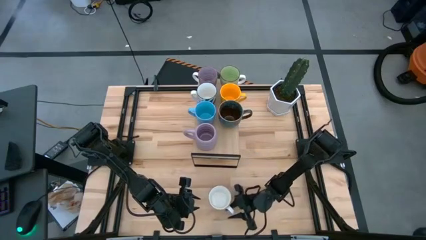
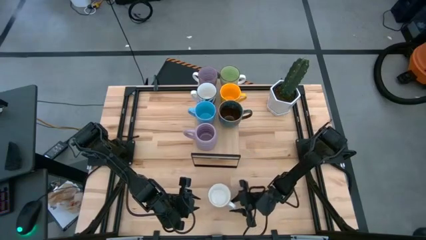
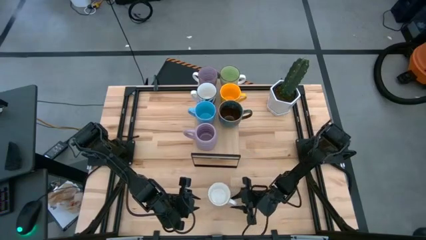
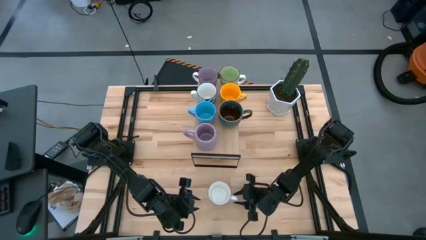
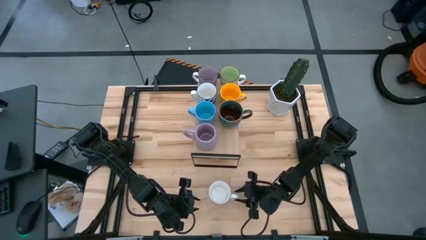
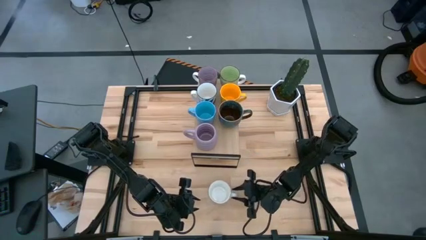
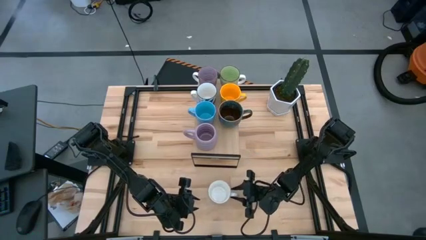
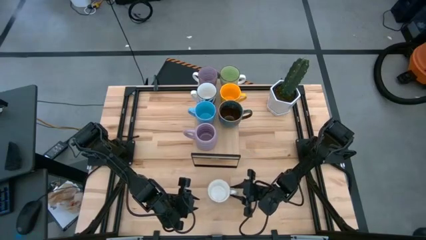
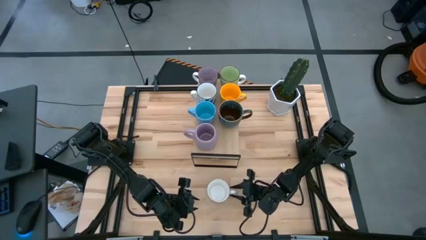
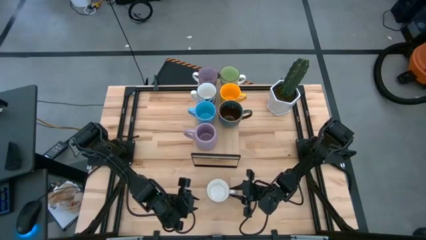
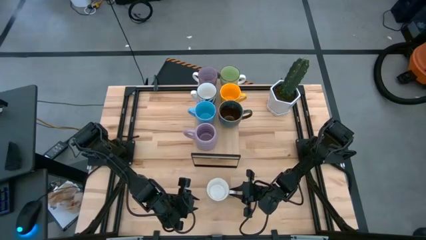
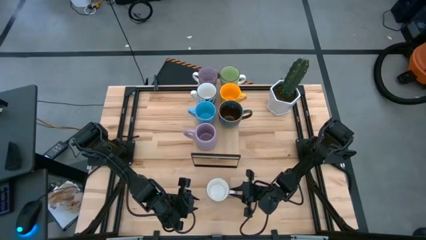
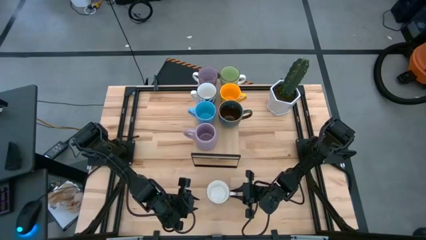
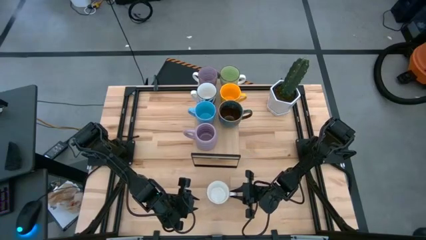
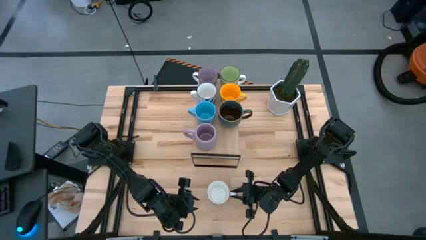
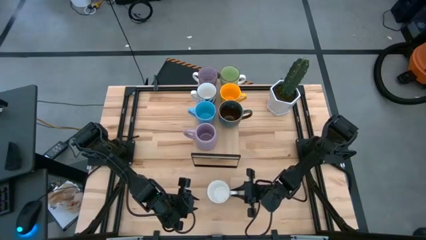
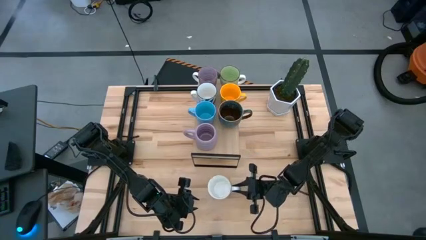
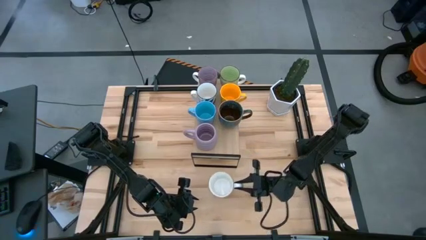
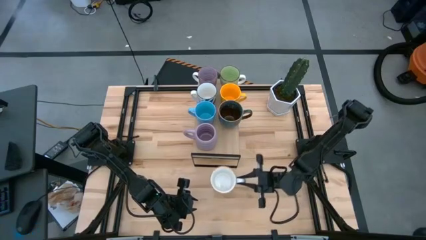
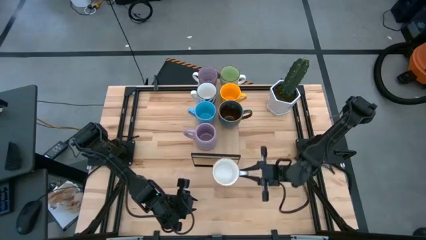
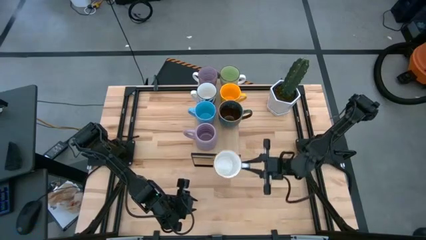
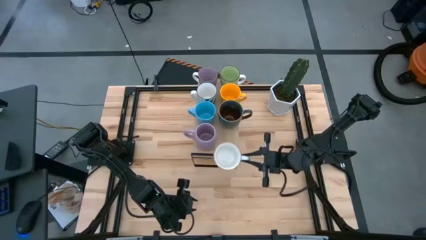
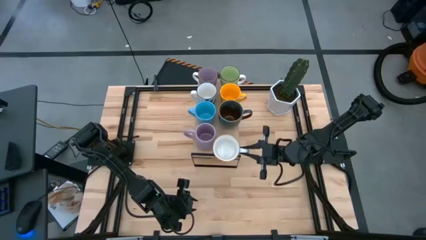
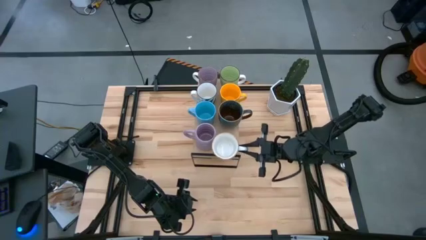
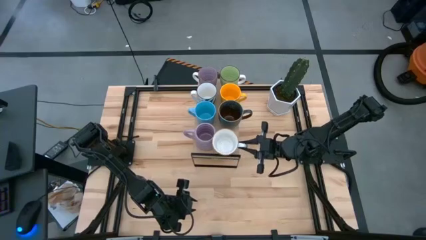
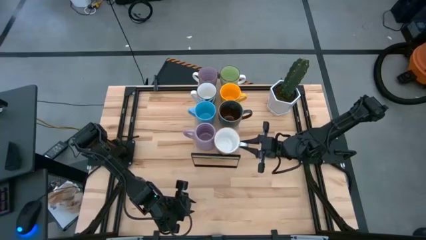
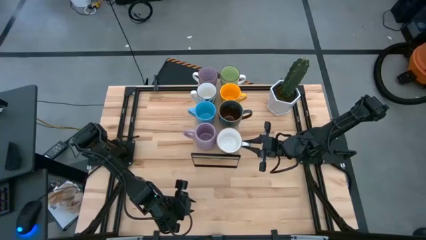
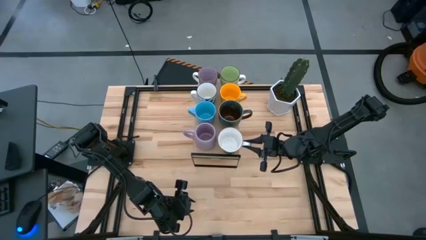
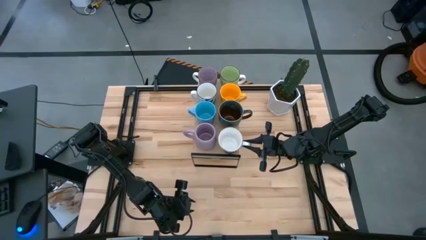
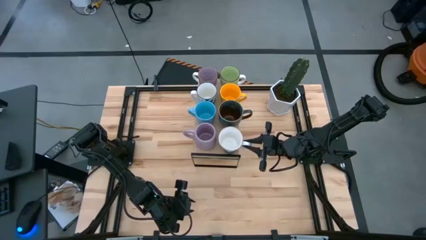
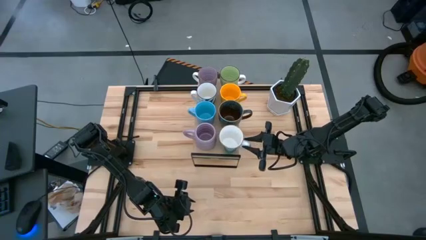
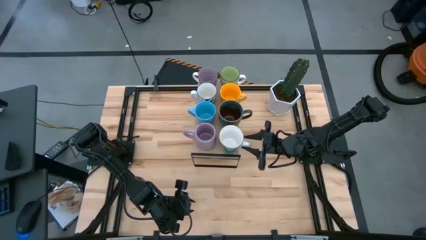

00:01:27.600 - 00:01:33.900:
Task: Place coffee mugs
Put the light green mug on the shelf

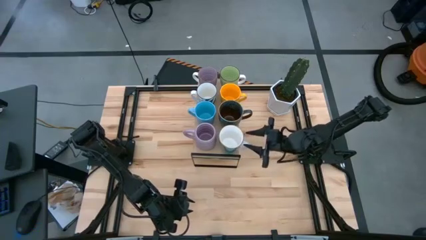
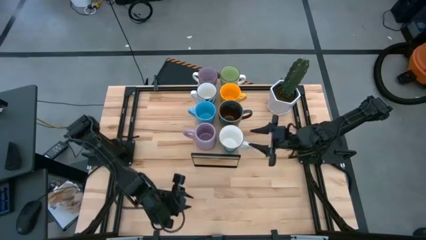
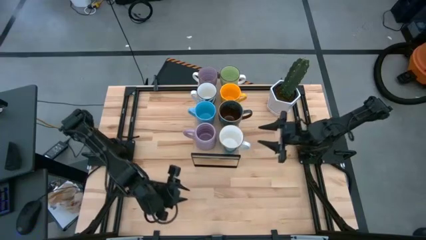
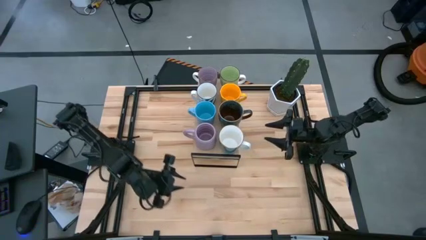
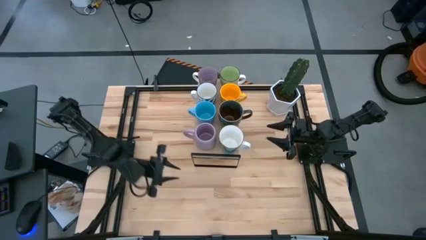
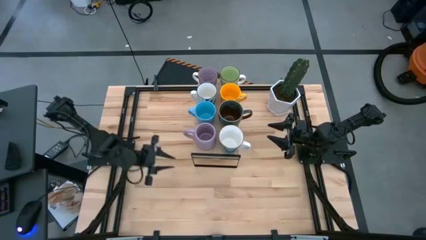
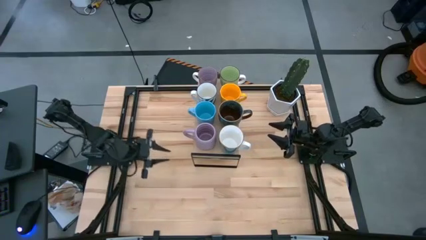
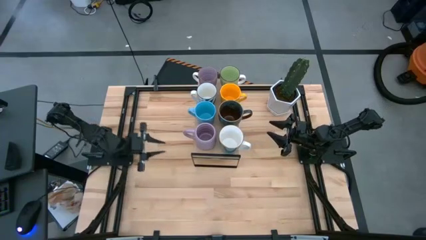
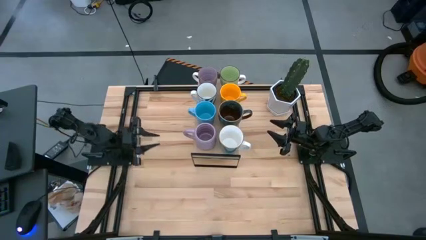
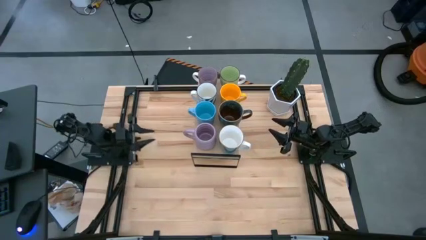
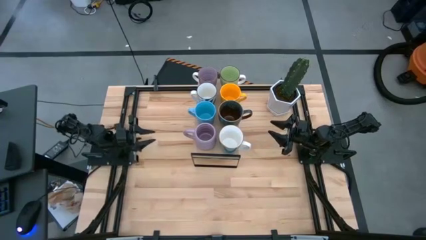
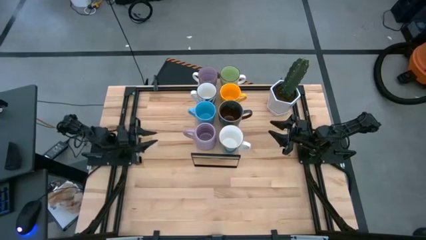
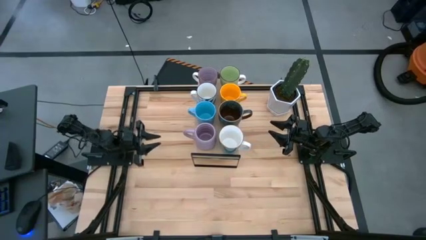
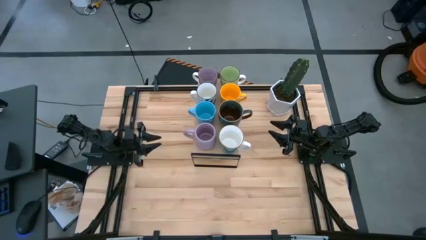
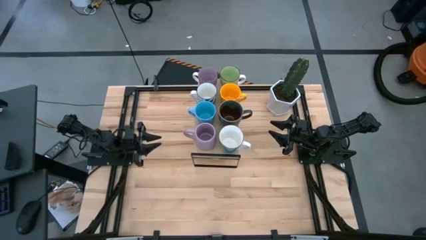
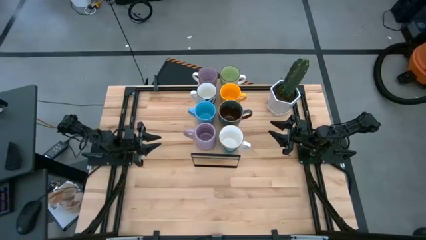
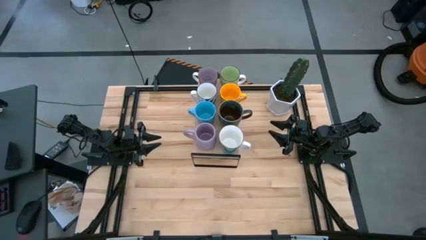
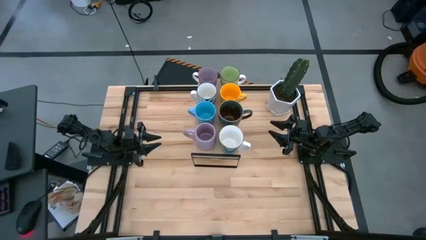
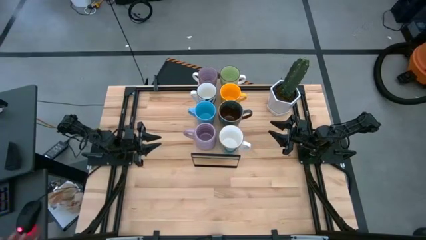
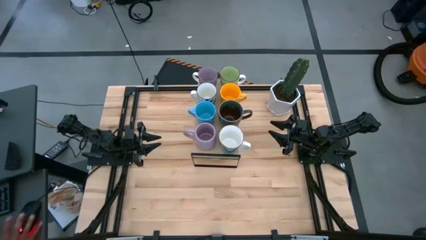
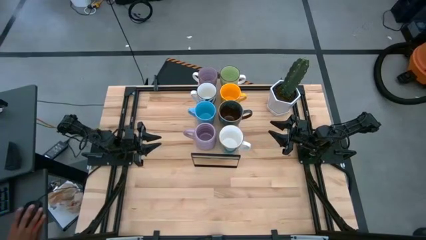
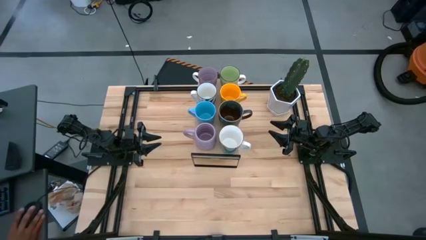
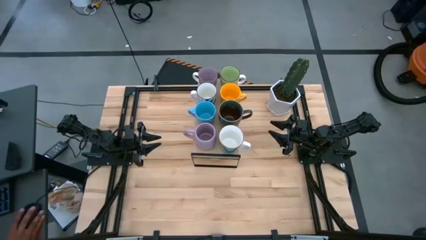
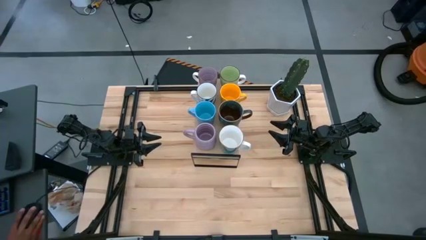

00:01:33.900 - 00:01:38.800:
Return to Home Position

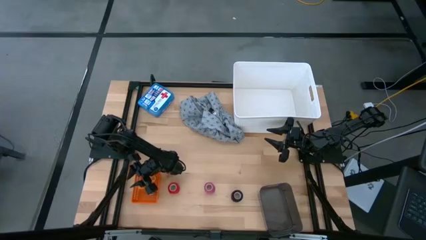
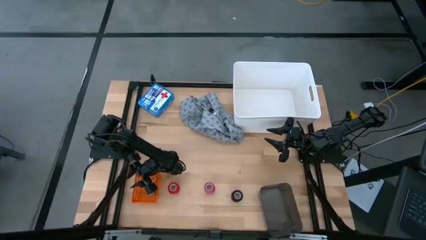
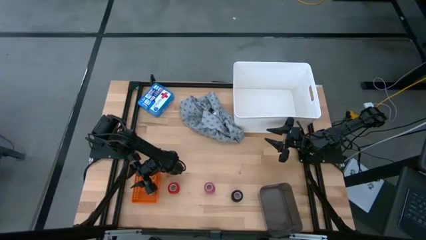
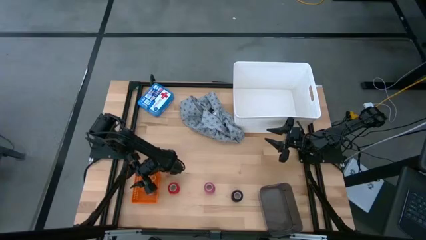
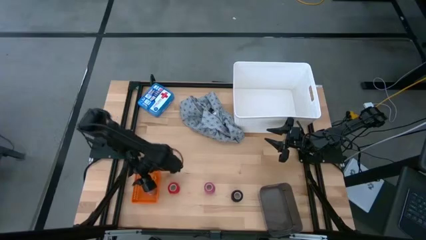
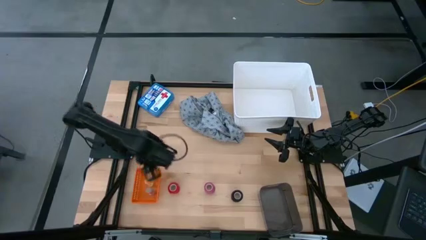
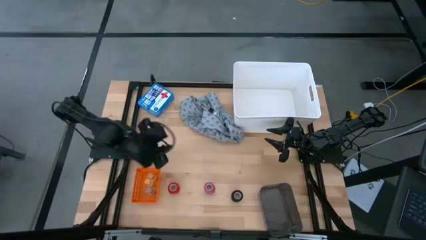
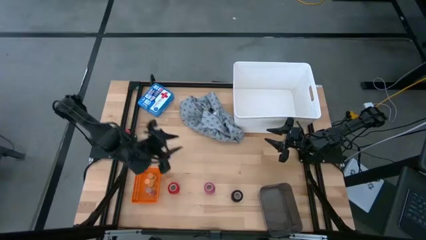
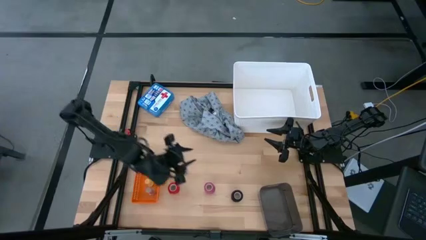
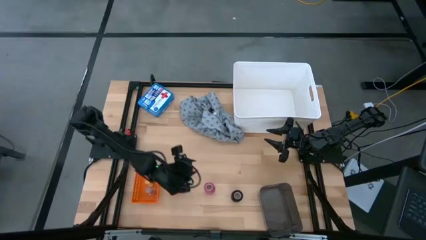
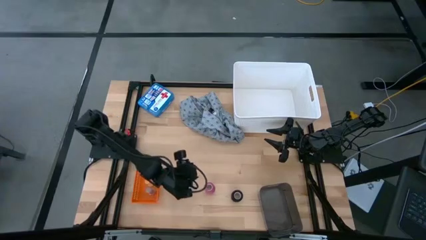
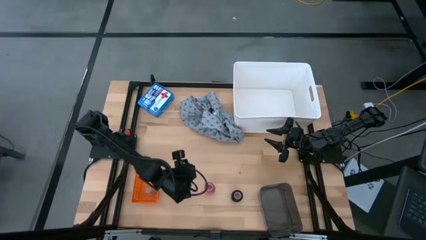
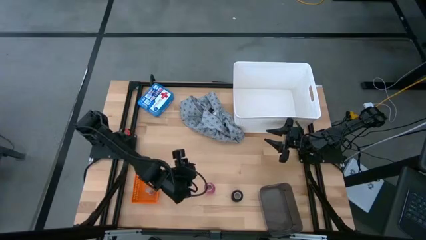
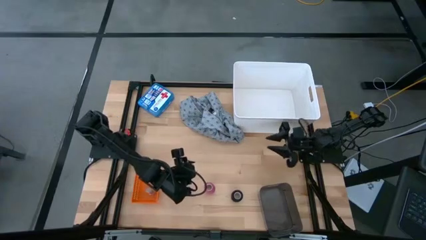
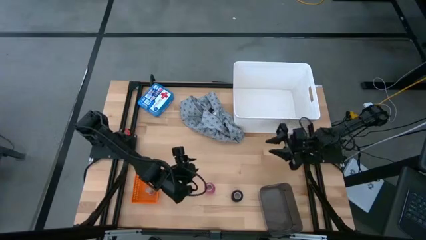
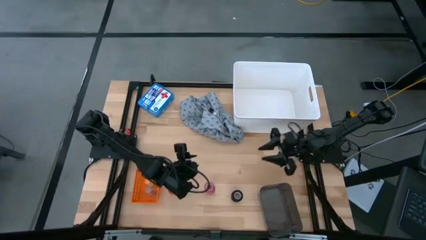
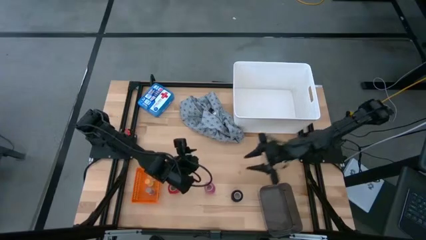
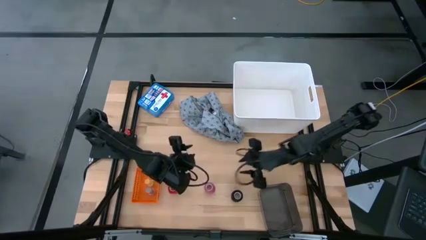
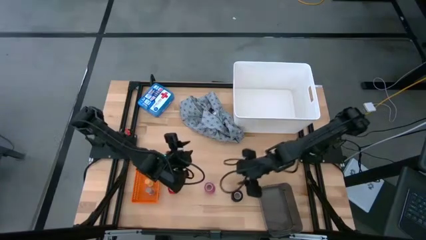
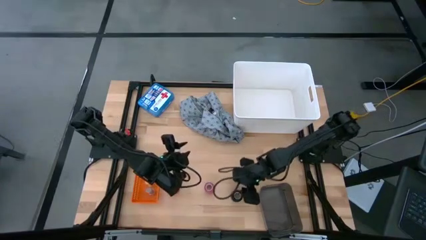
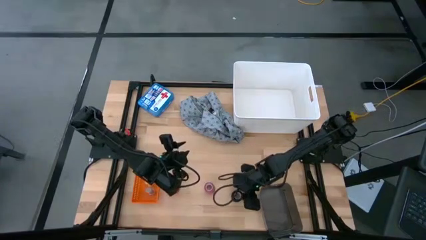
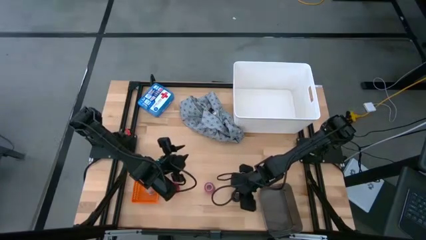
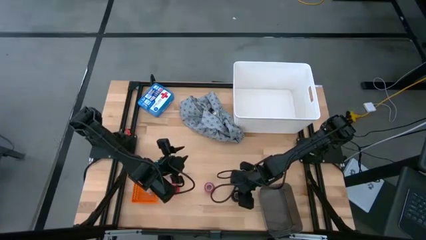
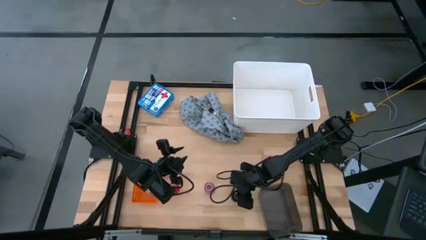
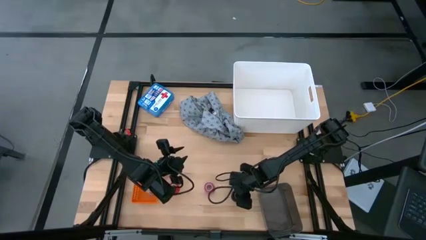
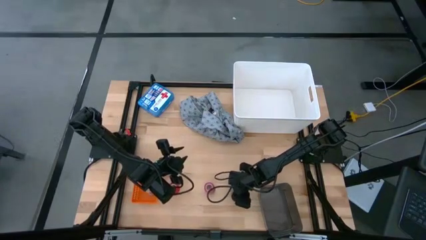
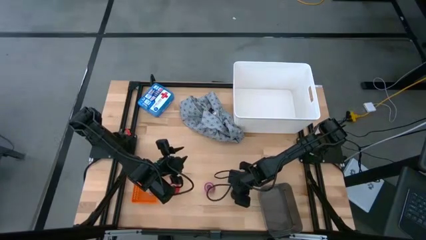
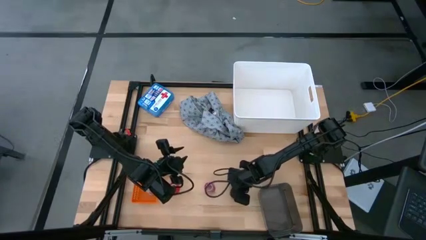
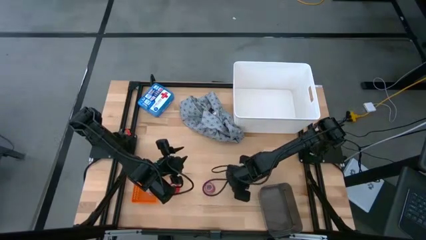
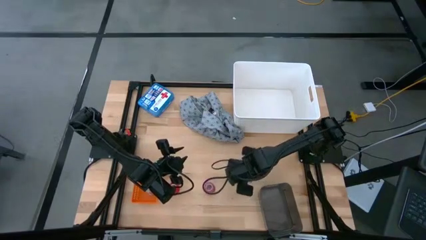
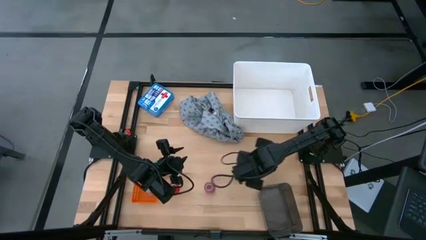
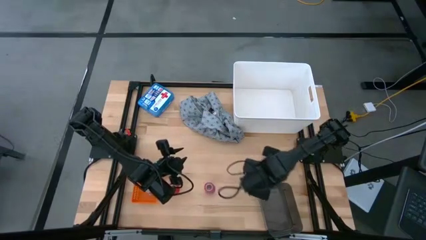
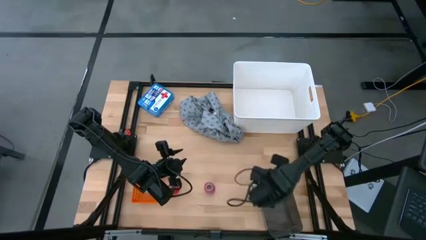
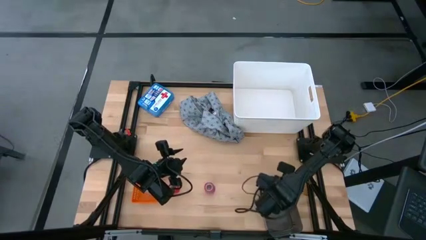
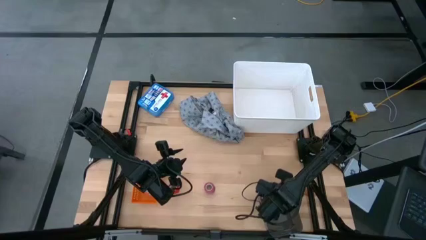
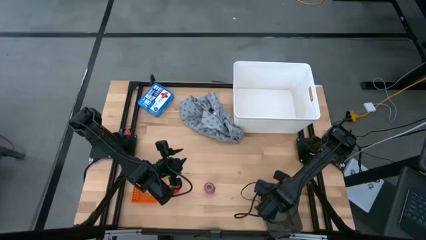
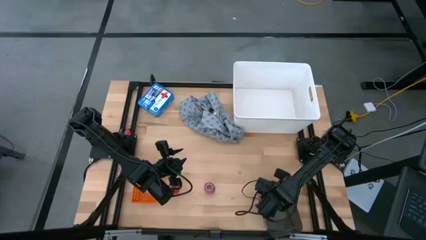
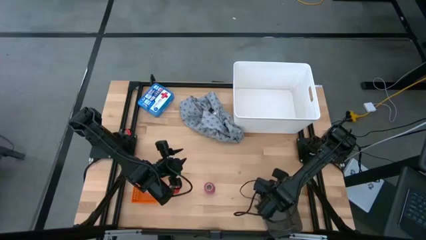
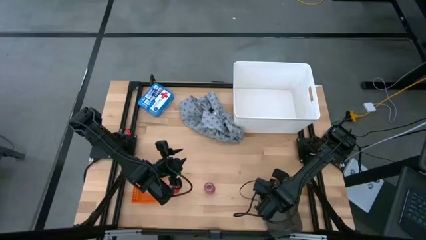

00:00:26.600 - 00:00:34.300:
Task: Pick & place medical supplies in basket/bin
Put the black bandage into the black bin
